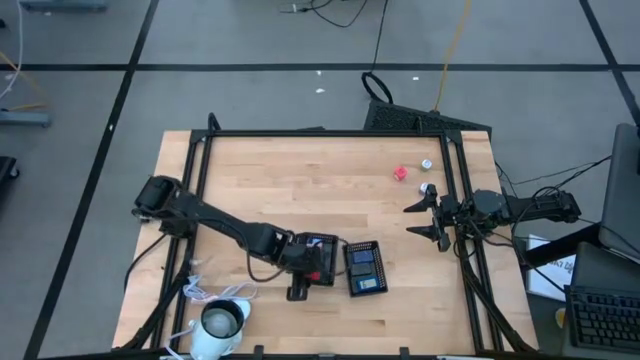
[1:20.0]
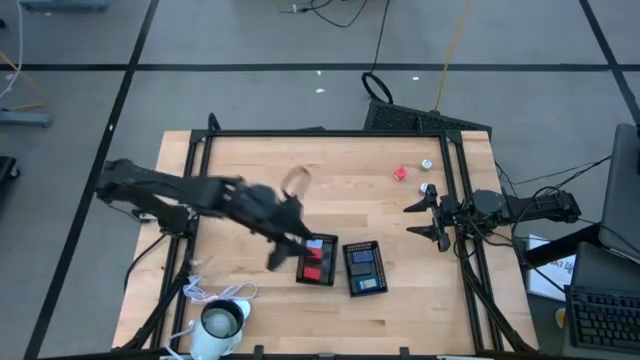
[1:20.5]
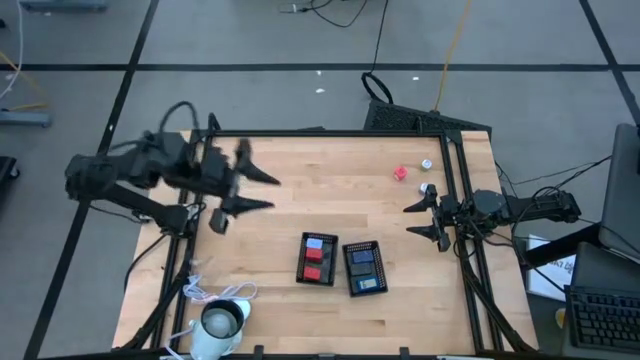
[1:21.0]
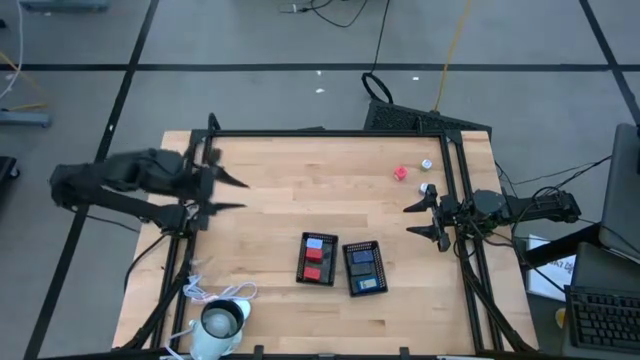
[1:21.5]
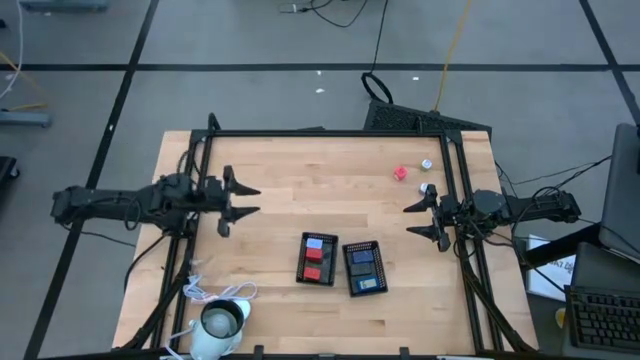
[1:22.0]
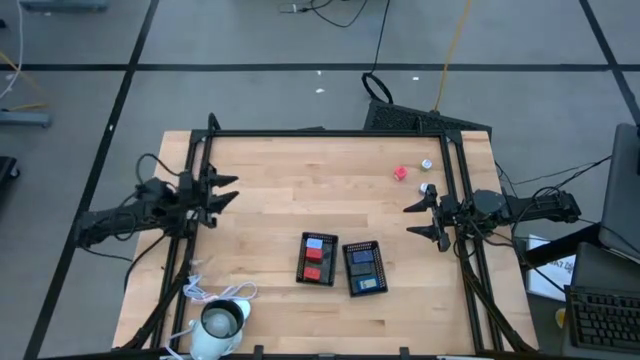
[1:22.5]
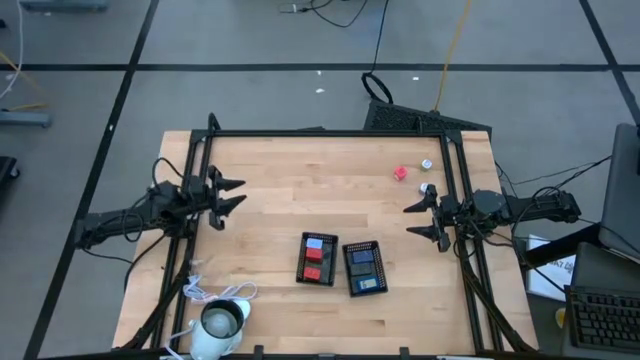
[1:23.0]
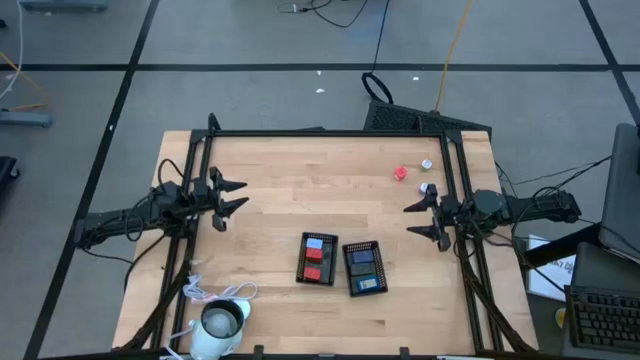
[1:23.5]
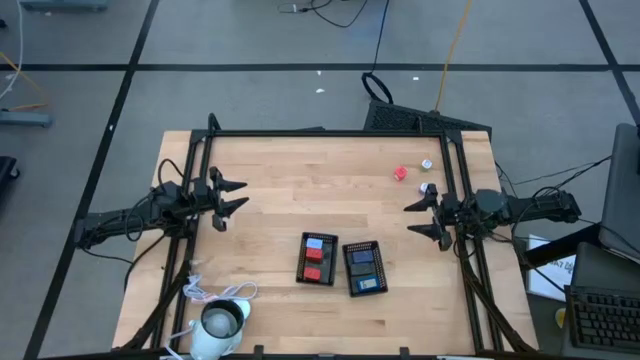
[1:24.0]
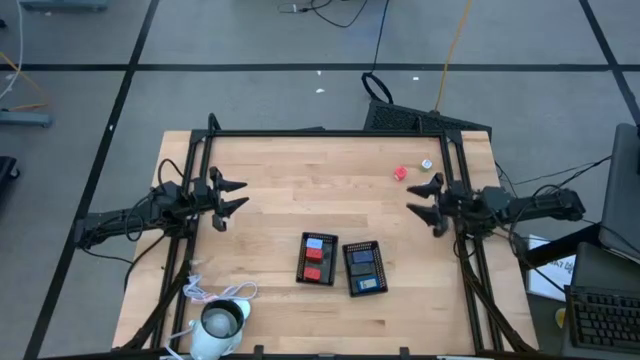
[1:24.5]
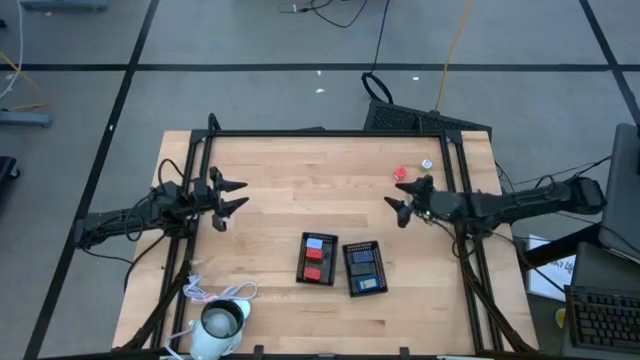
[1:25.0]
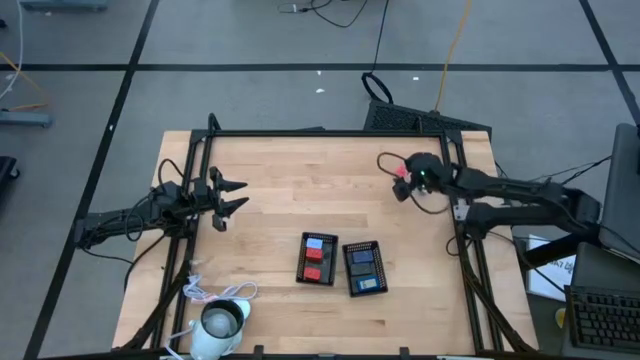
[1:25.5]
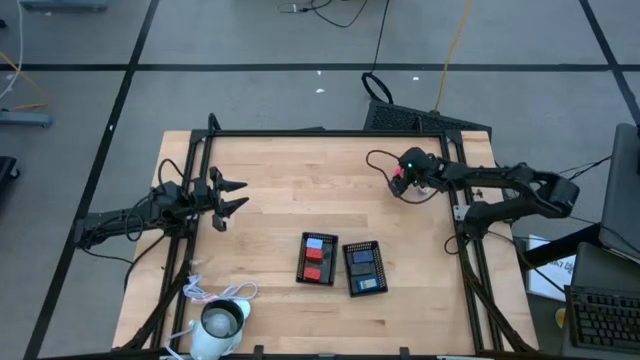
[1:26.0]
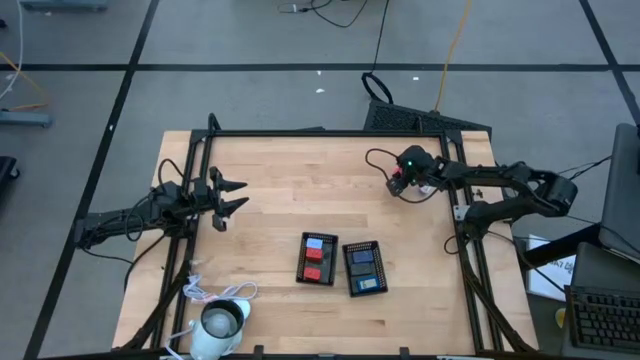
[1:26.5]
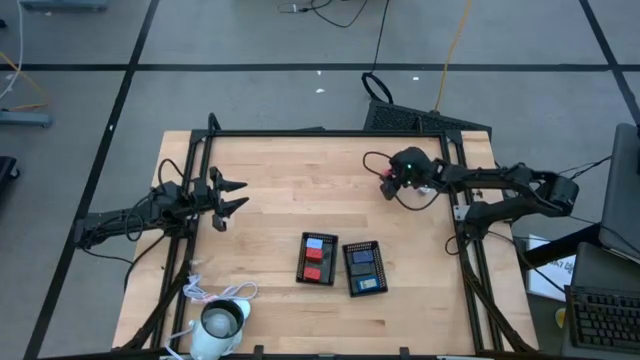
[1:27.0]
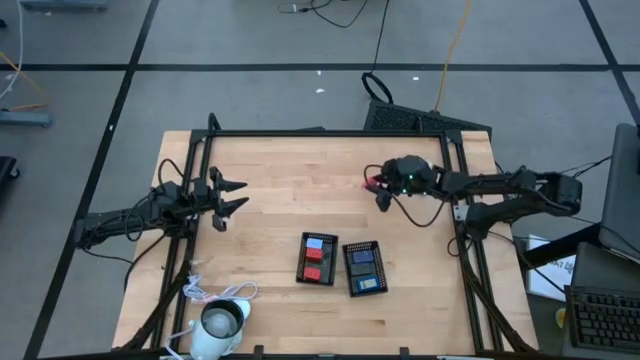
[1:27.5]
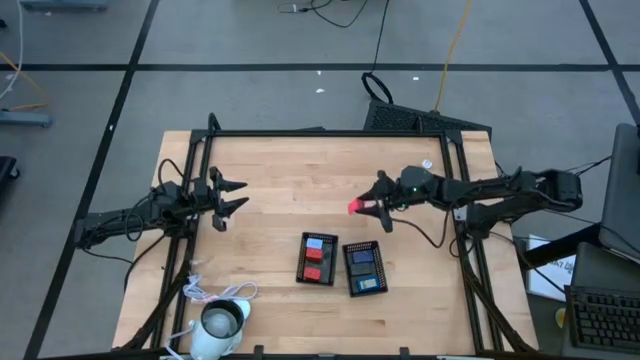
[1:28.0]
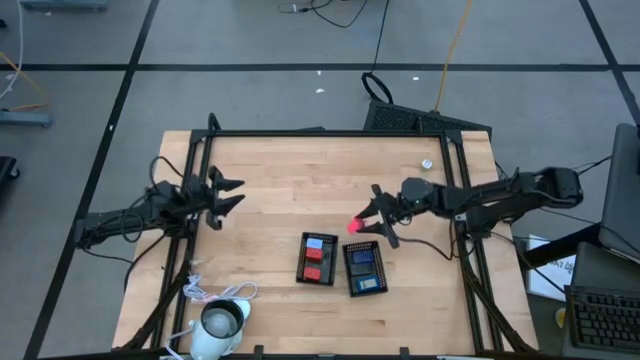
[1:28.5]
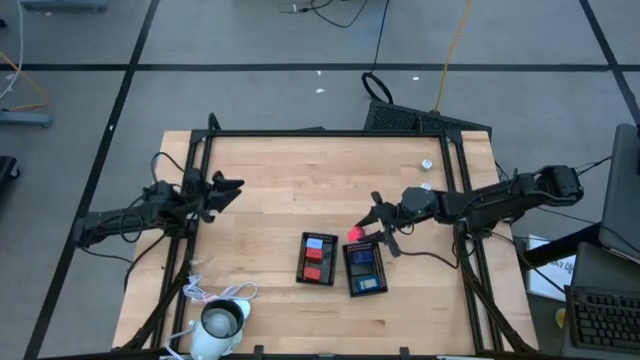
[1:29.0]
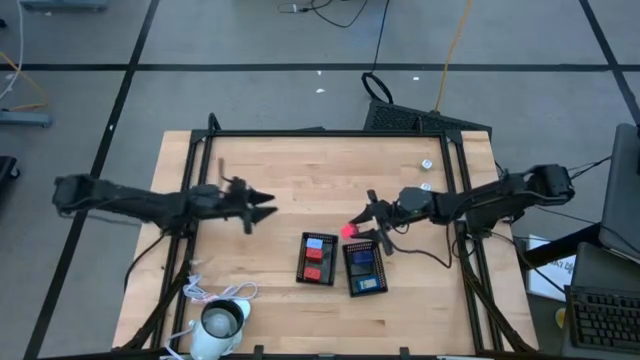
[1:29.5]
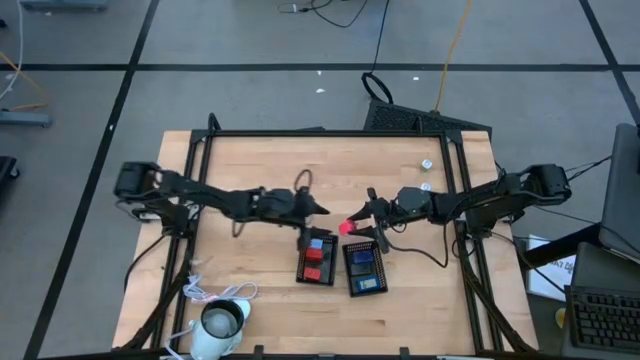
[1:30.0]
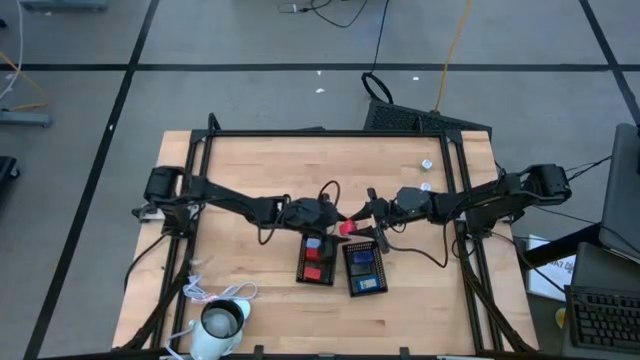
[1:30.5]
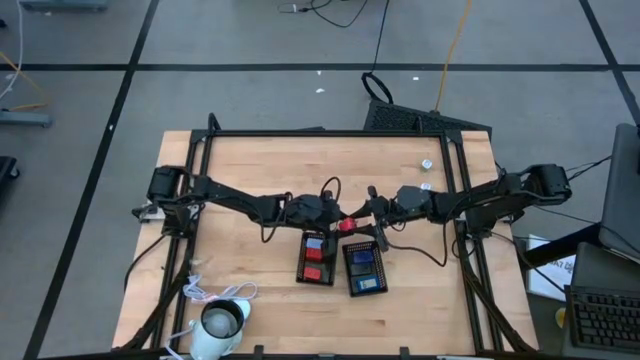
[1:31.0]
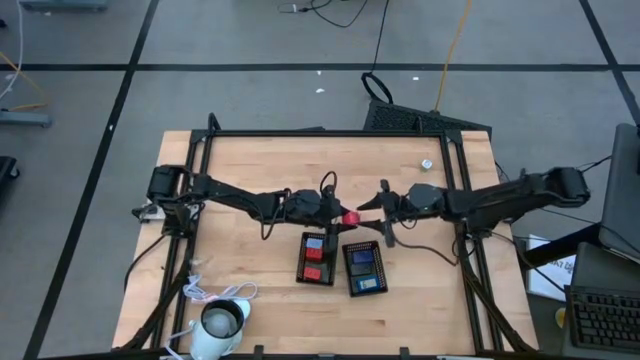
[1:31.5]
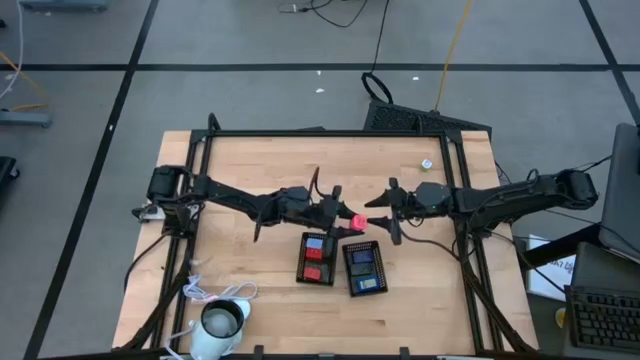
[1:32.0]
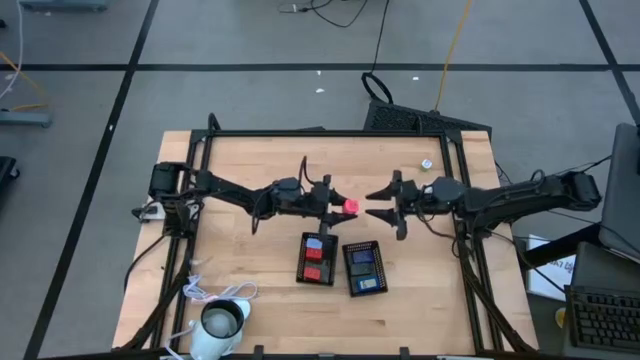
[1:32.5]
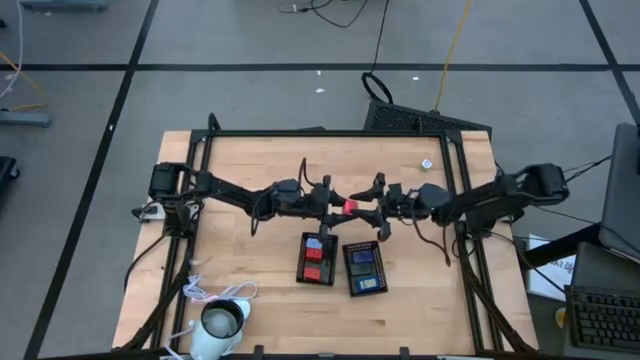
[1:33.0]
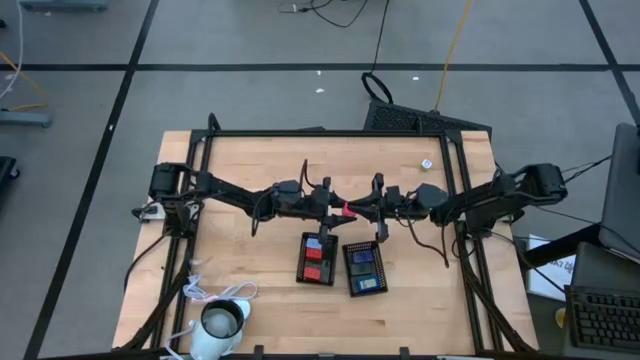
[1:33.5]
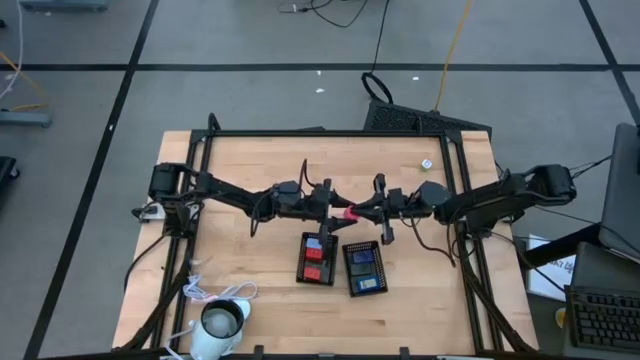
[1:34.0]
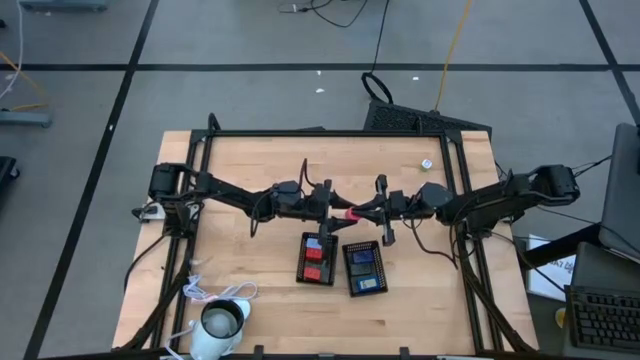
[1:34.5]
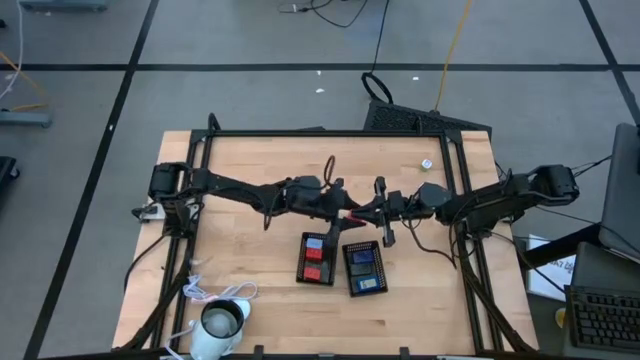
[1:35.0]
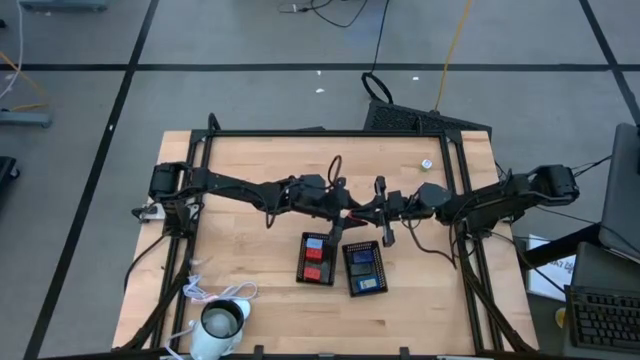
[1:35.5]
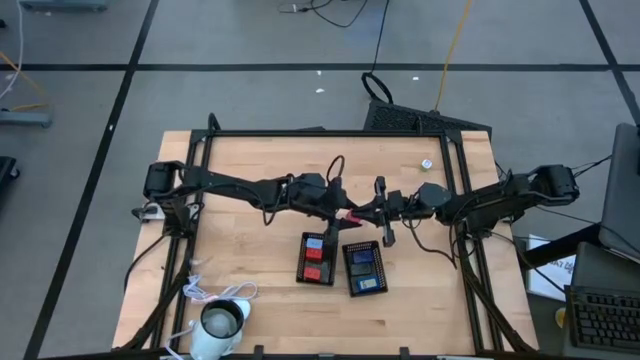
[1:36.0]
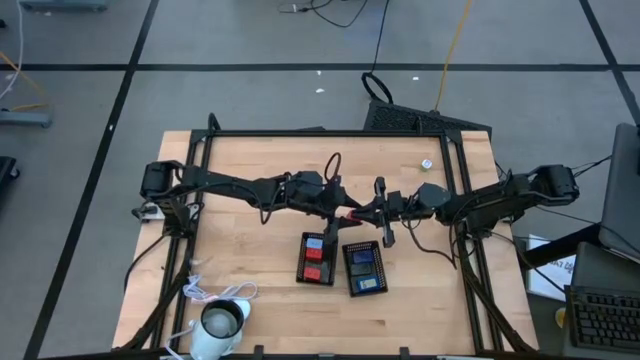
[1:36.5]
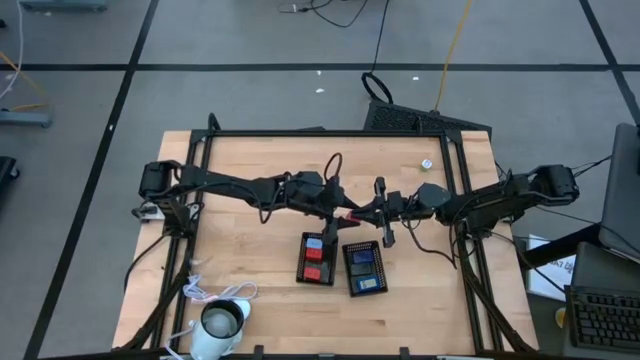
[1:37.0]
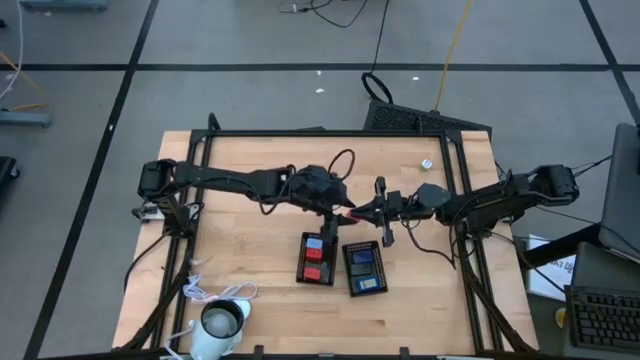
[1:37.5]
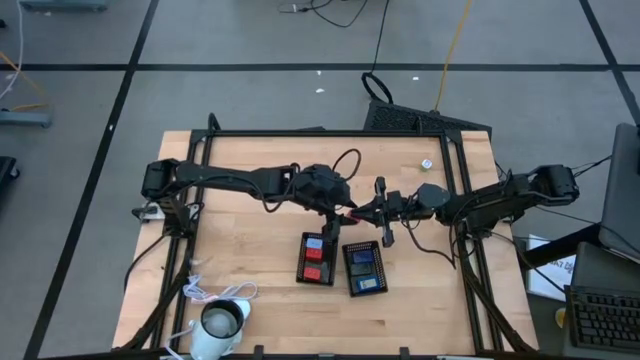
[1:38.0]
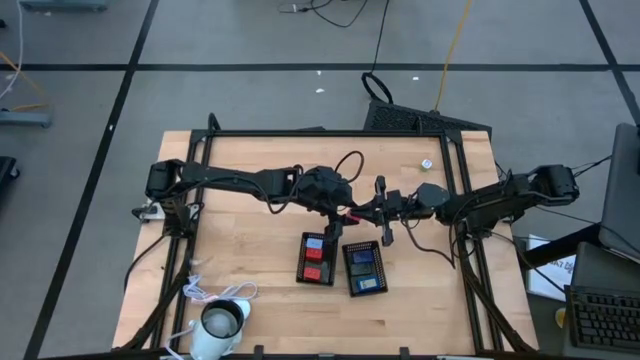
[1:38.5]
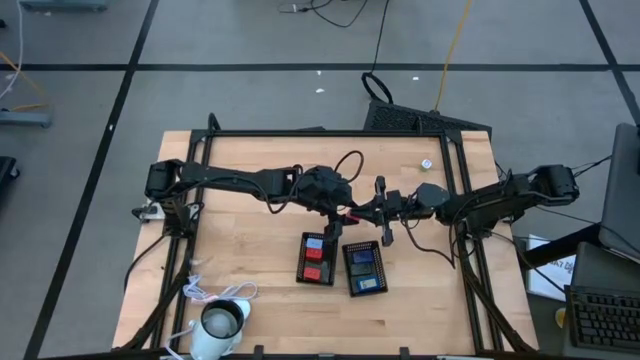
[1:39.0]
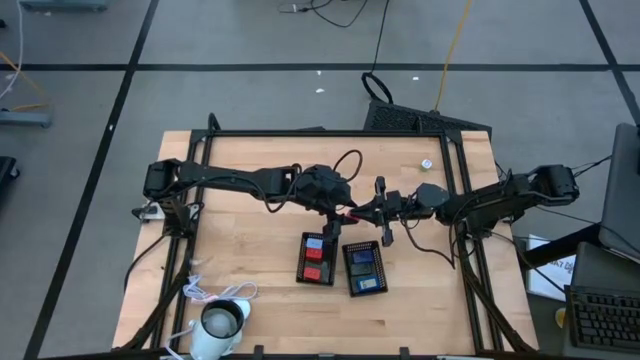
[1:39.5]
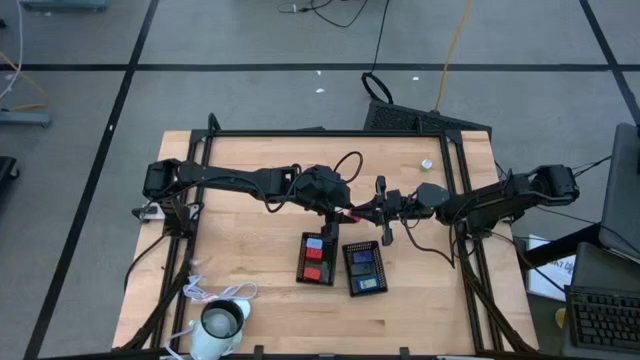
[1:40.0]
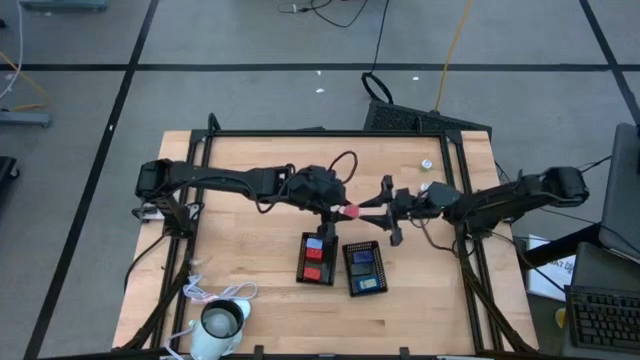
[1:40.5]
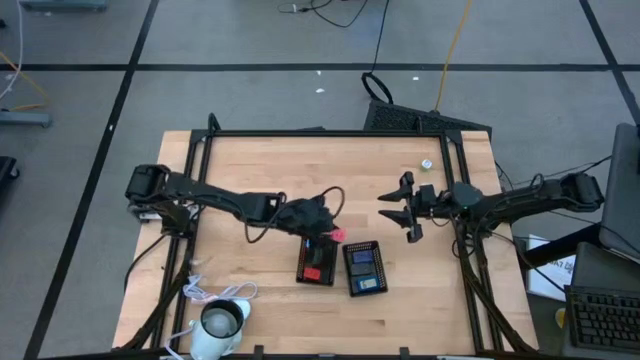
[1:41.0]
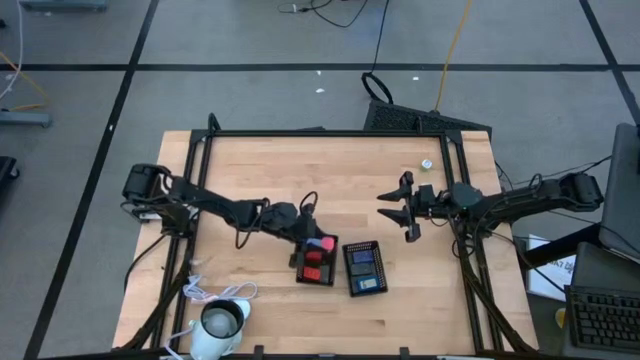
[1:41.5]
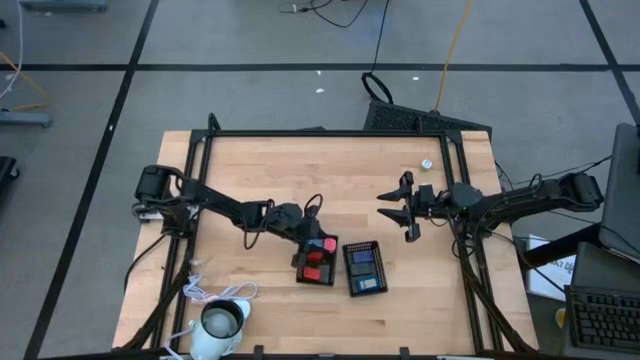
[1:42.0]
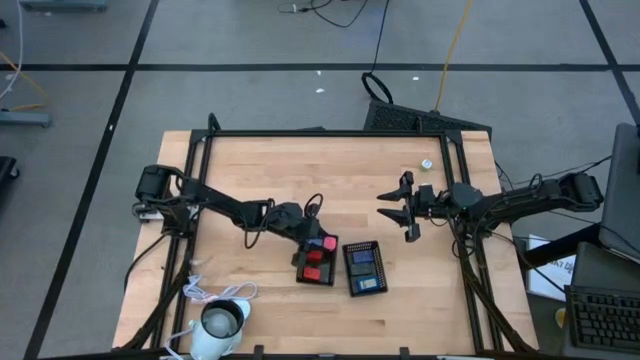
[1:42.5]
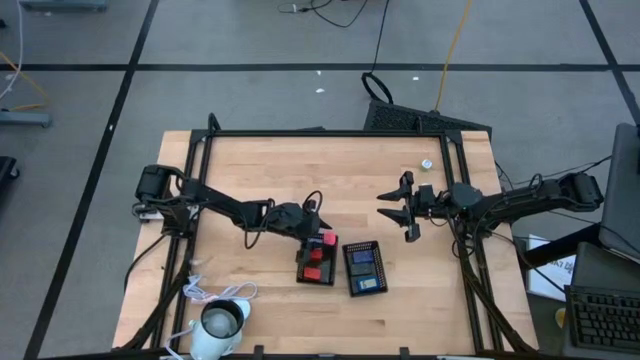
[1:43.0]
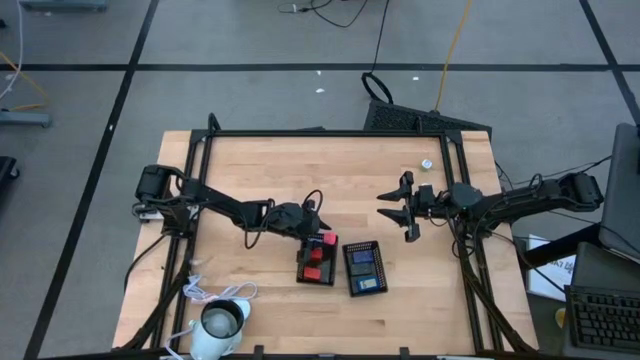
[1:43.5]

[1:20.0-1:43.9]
Task: Pick & Place Office items
Put the pink charger adapter into the left black basket
